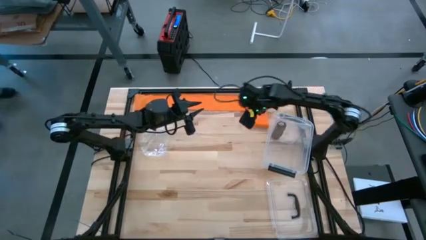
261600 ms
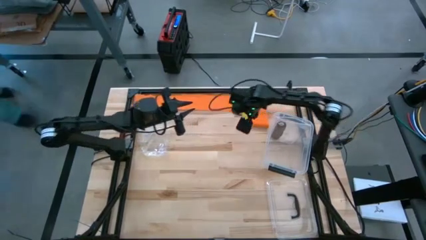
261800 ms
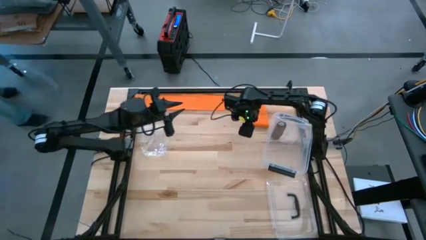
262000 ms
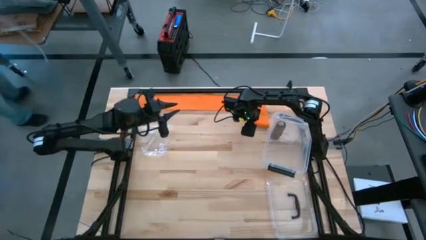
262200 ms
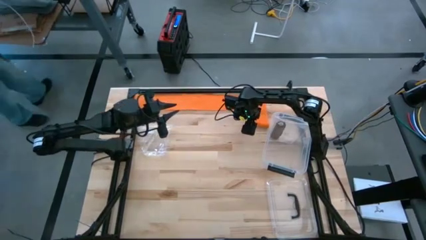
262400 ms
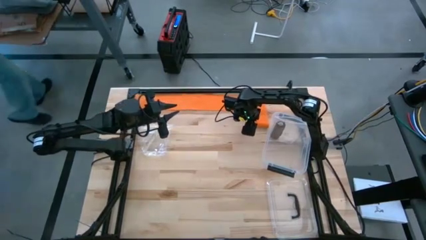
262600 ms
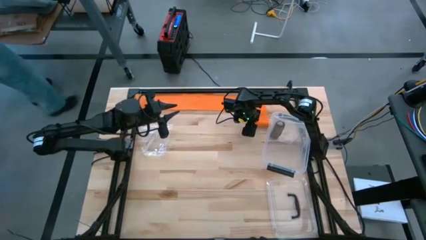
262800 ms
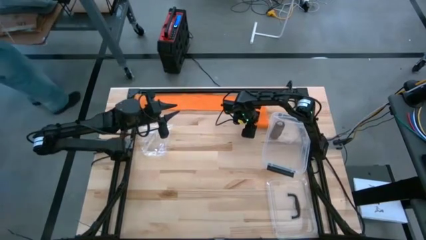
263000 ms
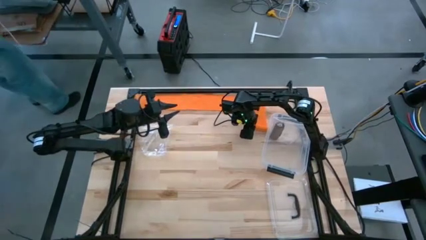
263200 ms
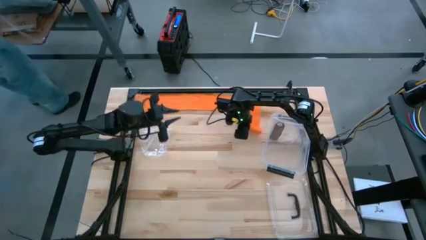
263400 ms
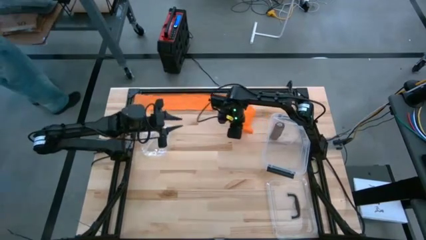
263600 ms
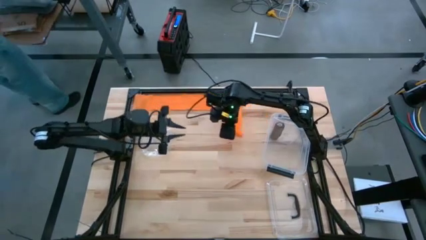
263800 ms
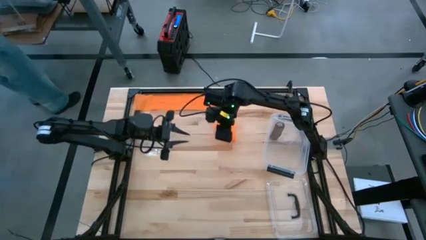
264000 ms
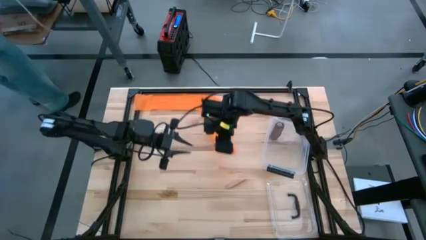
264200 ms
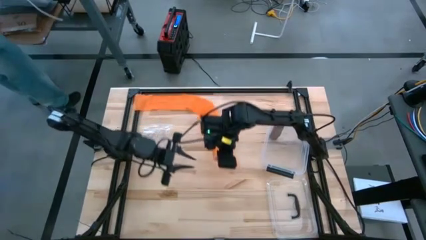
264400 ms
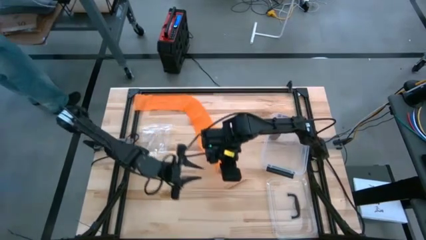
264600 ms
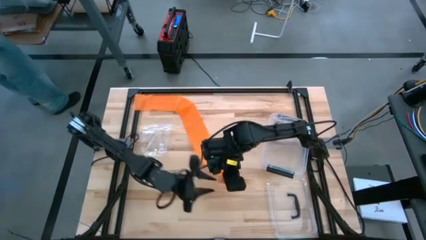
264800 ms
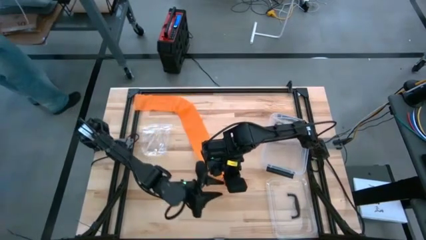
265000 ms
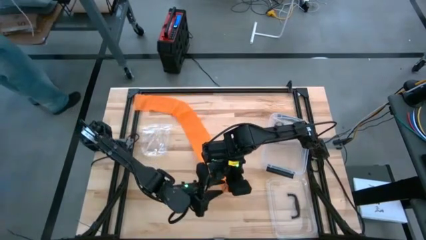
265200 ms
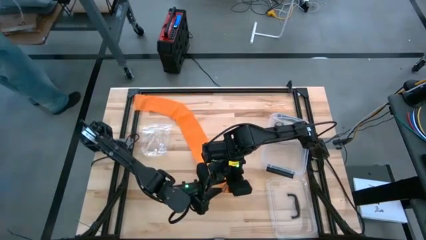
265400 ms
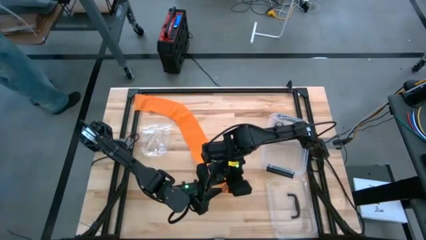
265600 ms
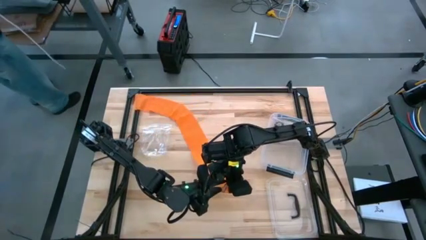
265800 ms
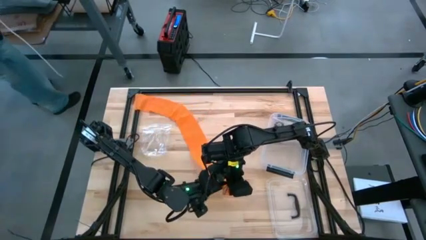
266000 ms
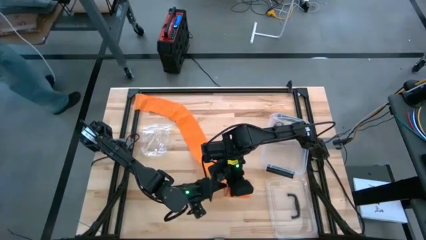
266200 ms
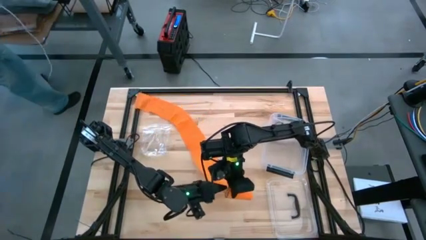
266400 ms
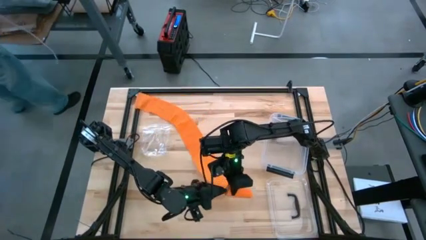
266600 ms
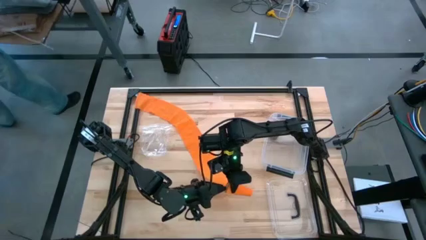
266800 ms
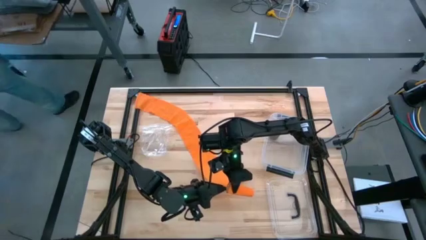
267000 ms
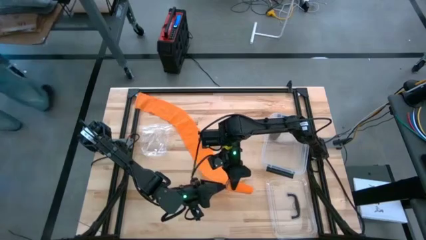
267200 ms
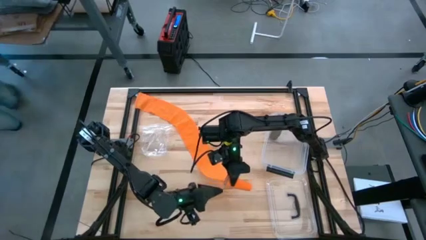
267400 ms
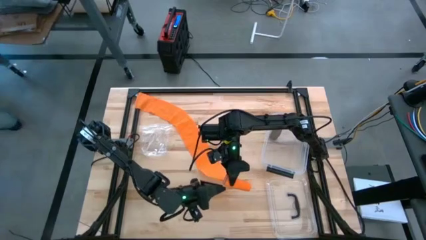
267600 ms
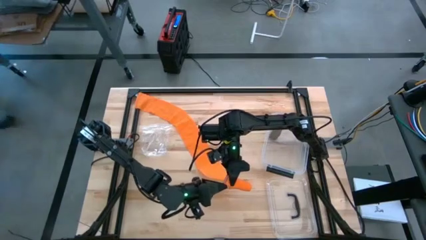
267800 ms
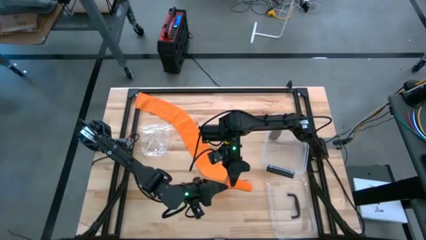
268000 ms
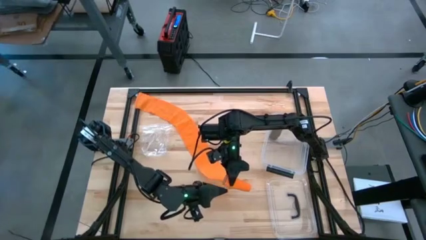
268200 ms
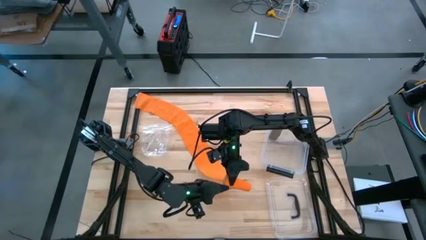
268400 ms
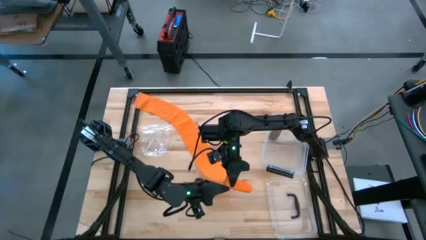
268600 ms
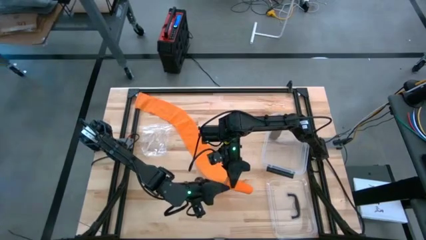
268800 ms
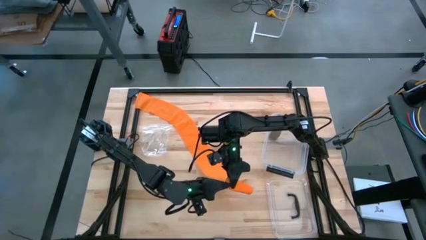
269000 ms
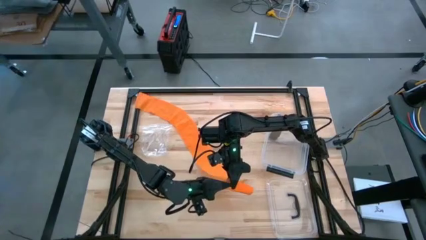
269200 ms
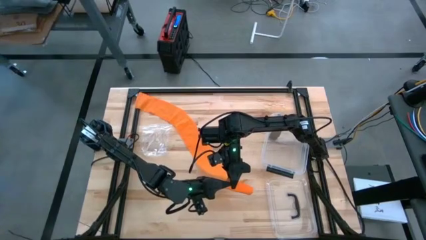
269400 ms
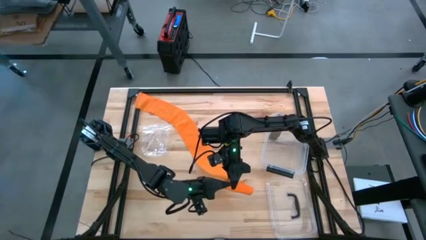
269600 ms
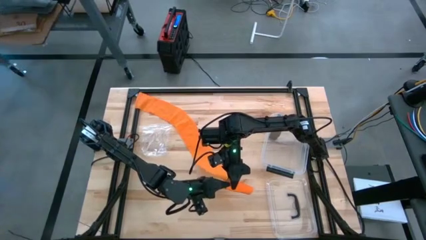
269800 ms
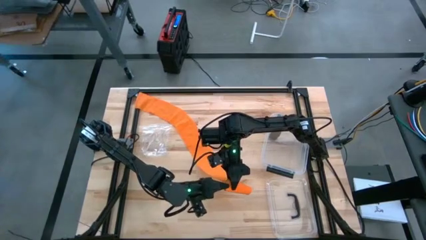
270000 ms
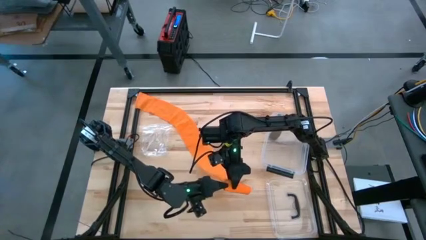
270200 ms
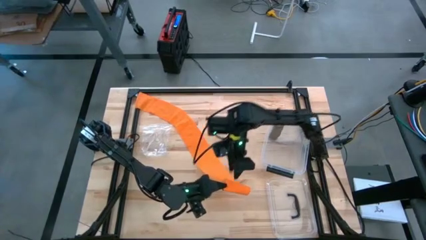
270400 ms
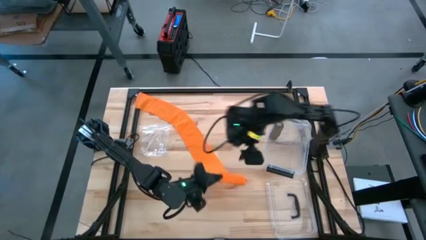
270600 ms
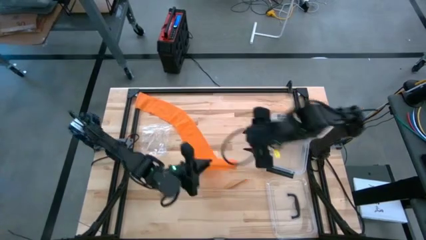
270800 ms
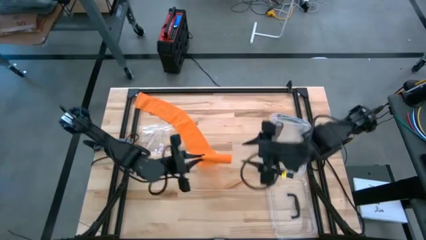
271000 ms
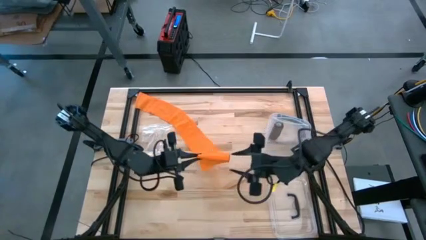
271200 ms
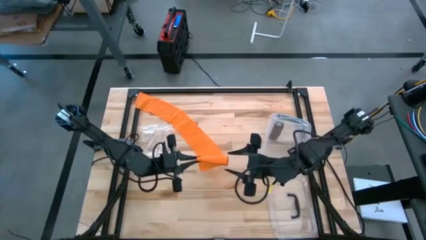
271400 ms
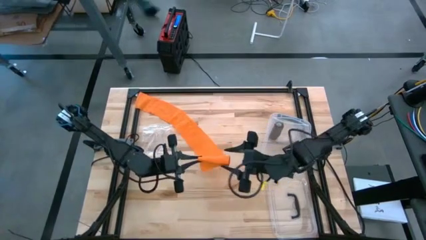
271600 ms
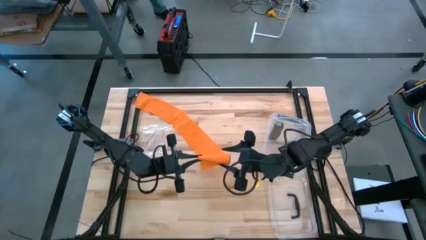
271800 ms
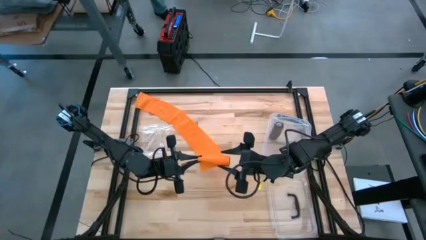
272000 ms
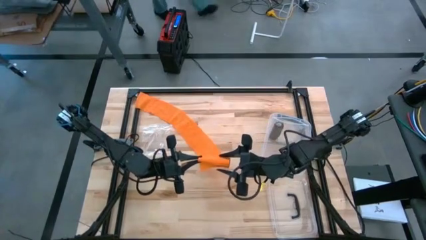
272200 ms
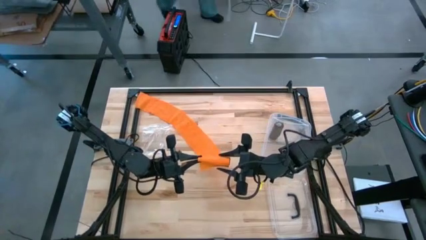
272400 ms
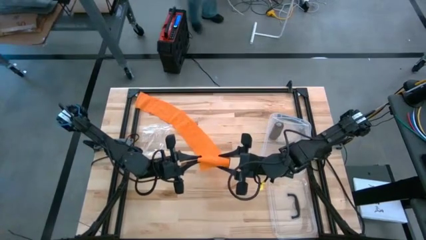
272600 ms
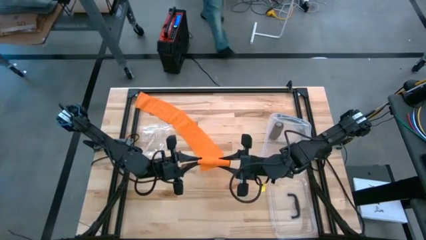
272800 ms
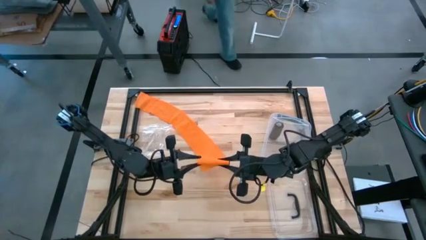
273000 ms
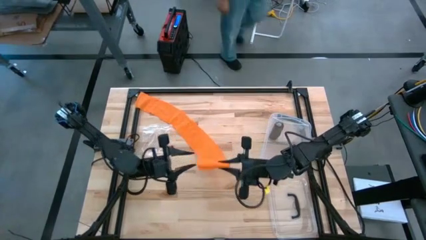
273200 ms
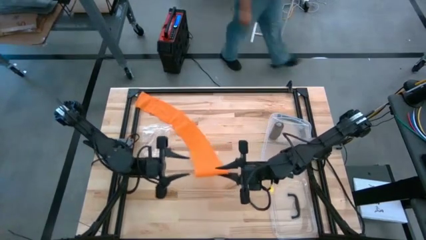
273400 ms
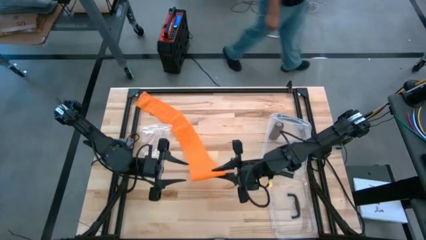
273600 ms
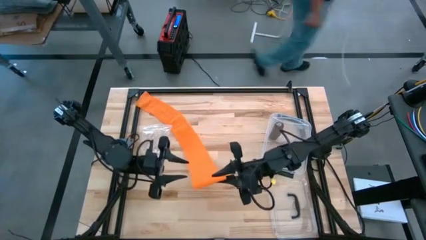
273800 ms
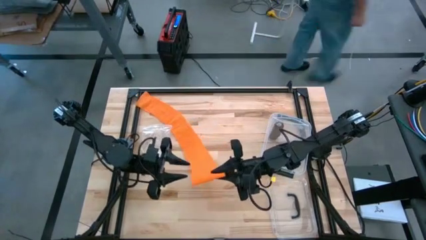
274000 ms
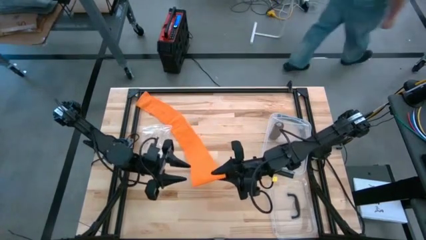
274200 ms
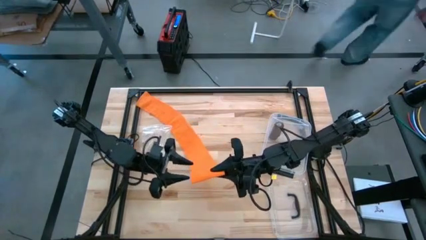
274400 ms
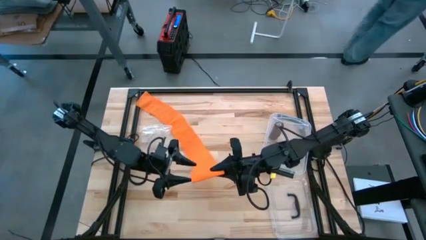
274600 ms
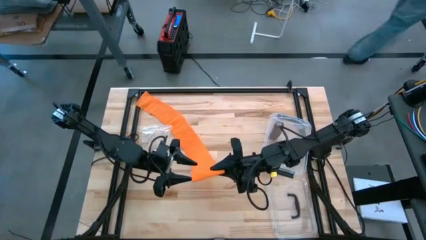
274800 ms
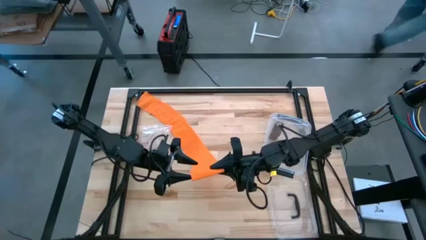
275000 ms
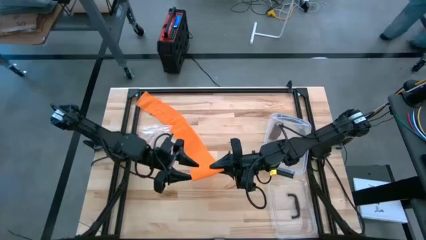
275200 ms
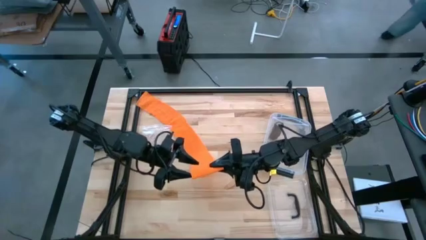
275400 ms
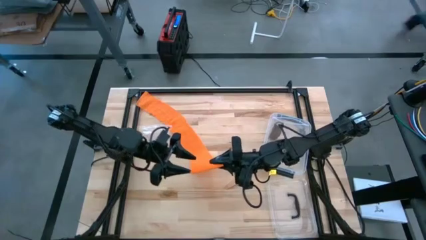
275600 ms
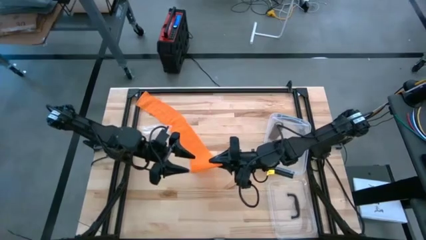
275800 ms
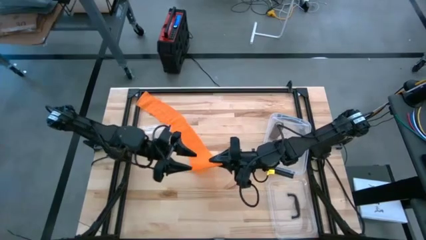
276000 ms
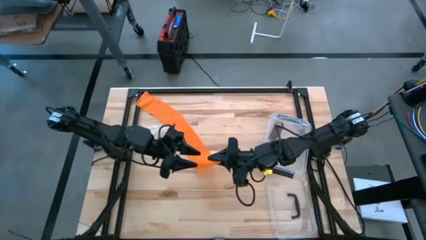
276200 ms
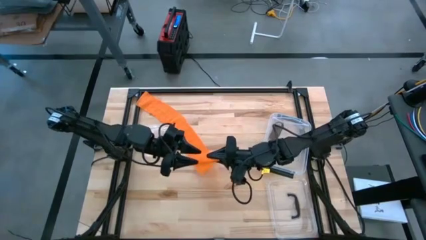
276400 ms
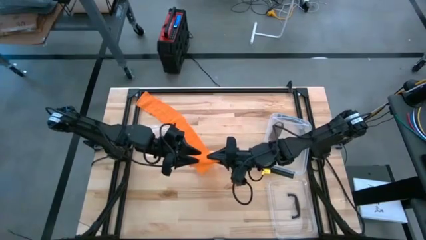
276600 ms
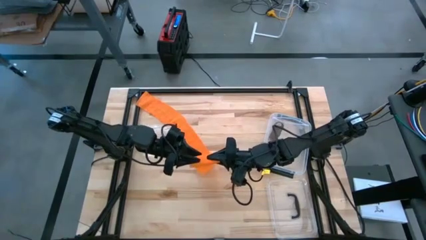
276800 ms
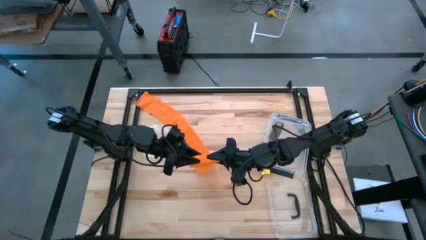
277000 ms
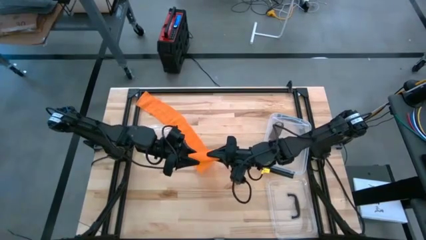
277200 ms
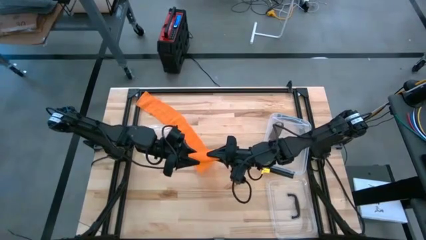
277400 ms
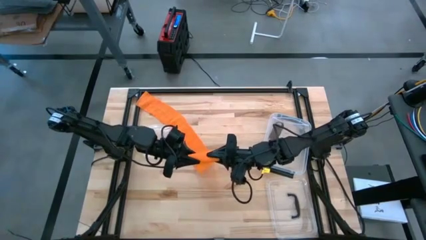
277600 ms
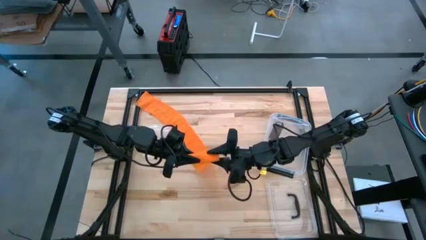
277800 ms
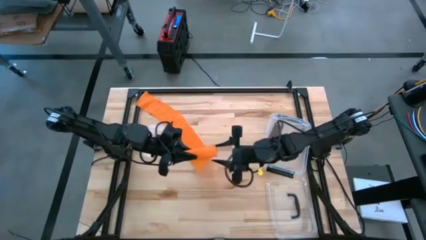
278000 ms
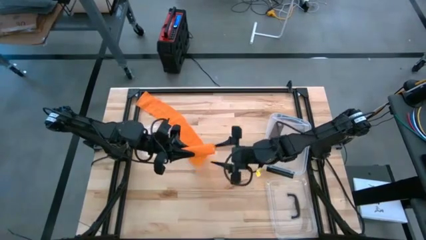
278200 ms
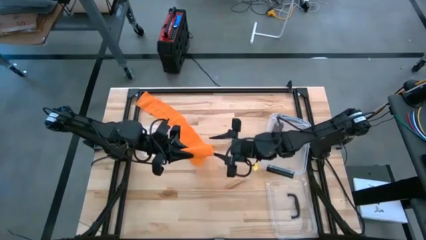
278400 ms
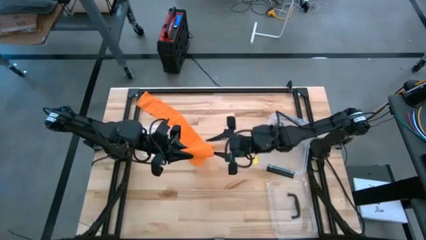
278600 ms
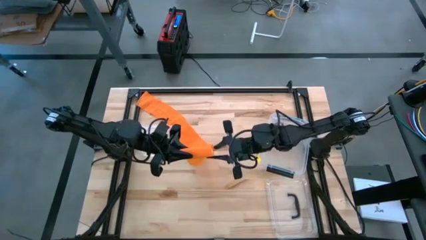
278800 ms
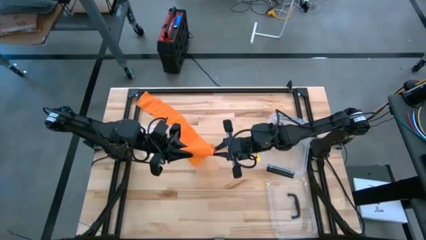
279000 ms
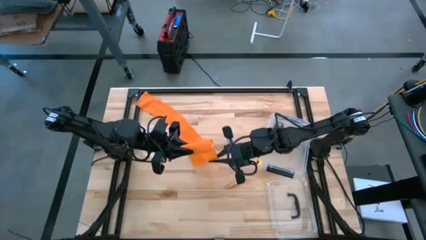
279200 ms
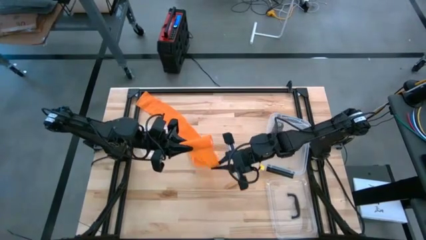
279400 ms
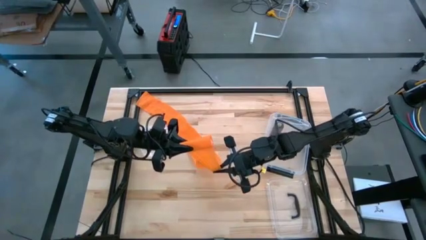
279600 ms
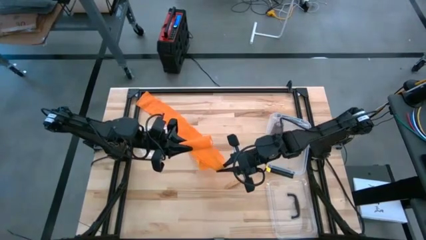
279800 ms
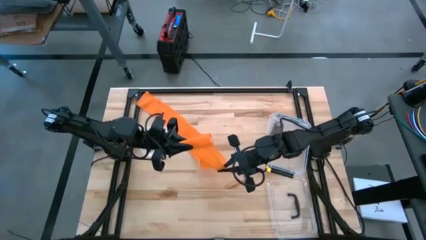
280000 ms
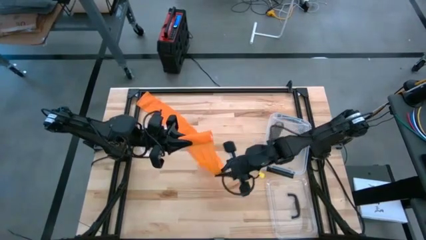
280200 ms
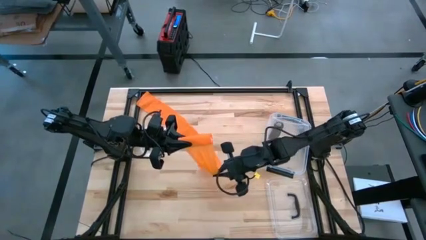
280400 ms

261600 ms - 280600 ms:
Task: Roll bandage
Roll the orange bandage
